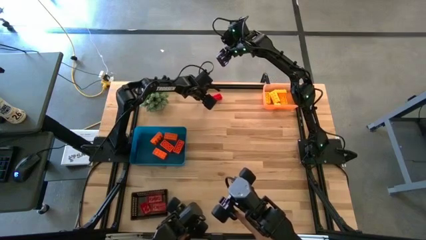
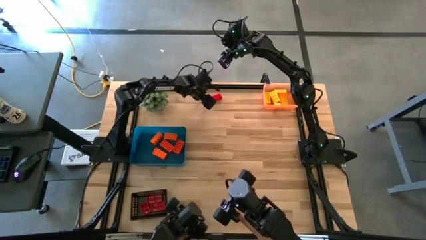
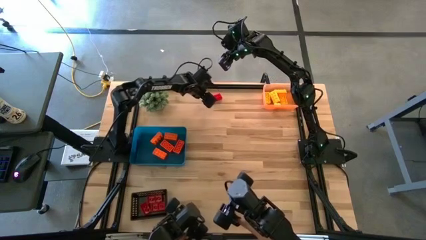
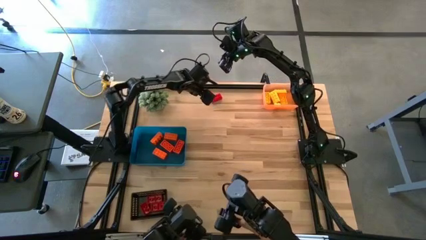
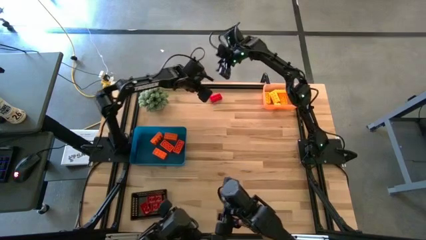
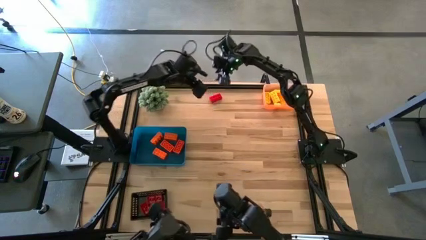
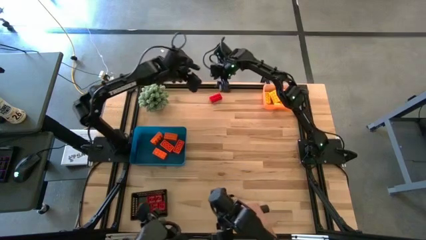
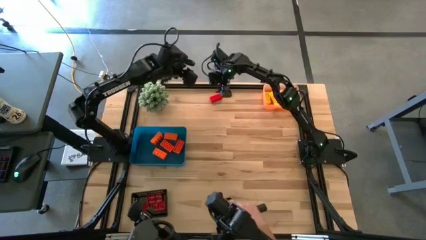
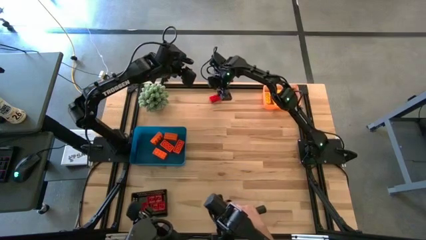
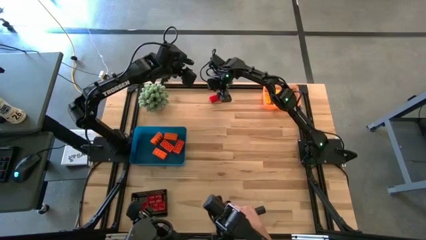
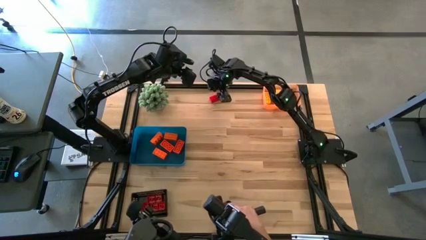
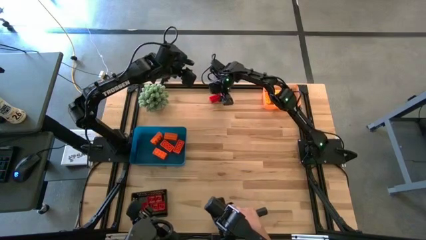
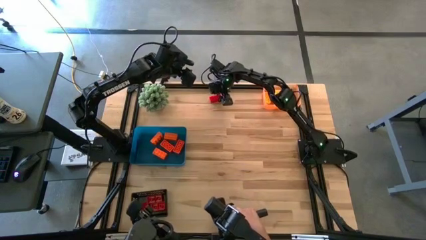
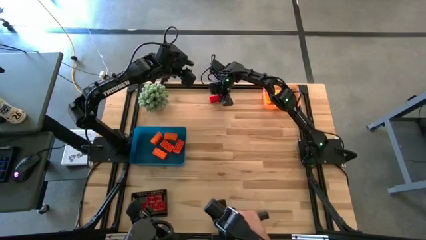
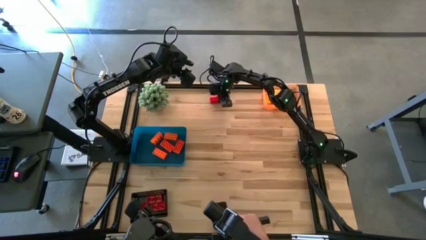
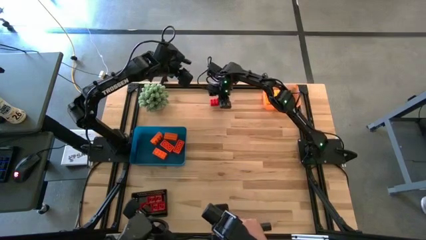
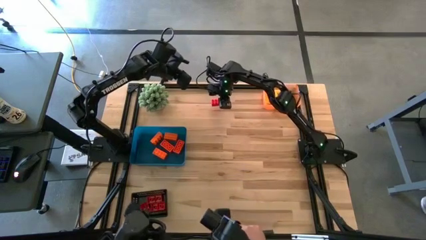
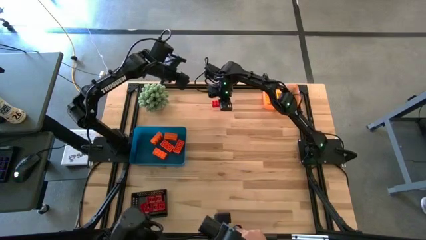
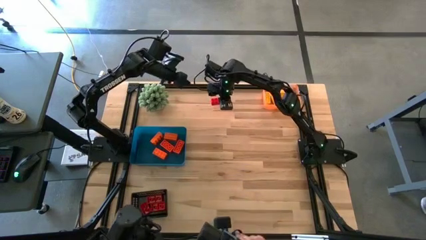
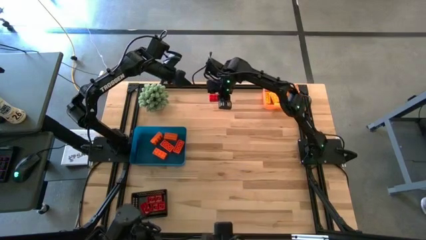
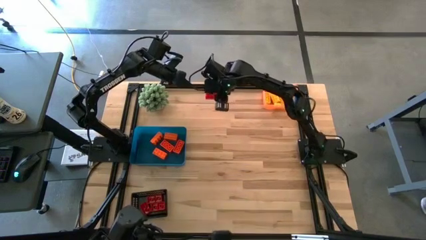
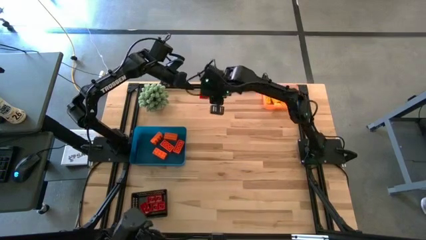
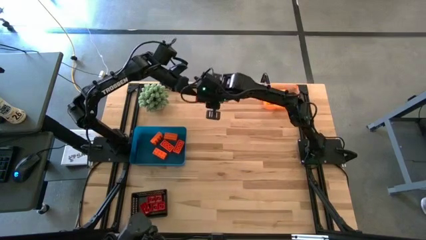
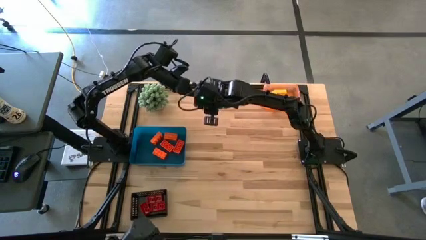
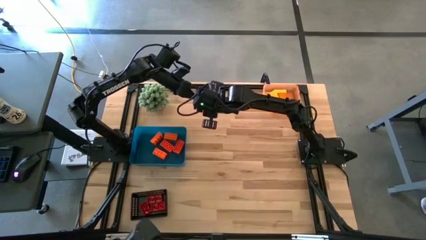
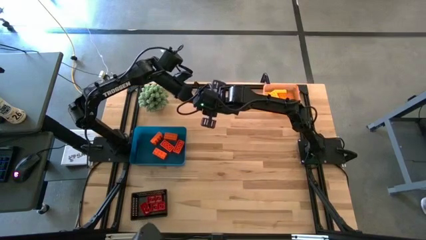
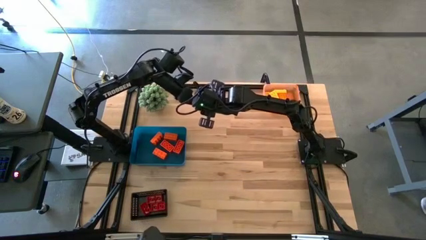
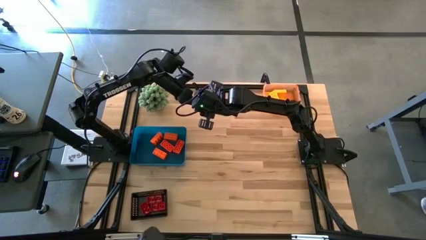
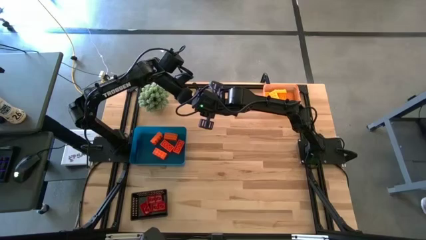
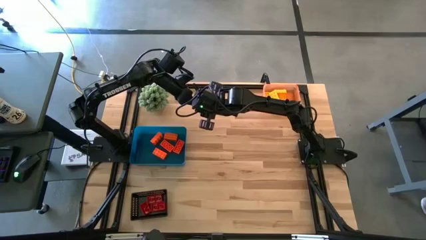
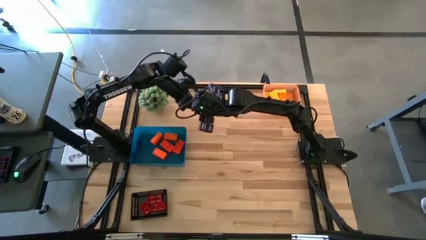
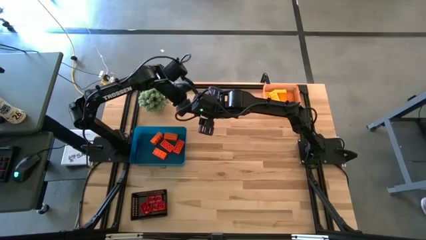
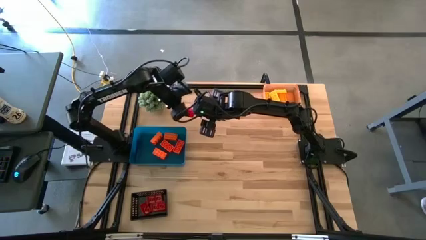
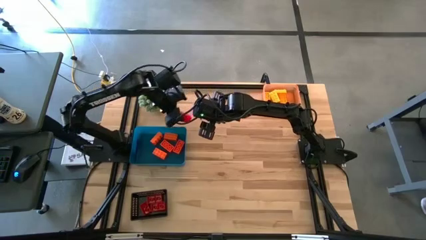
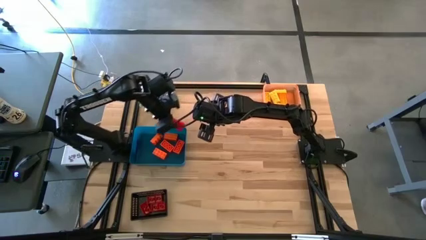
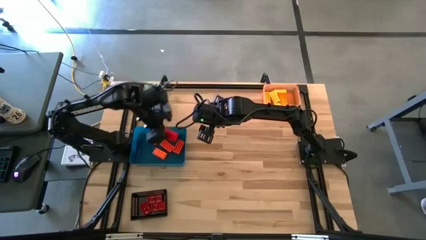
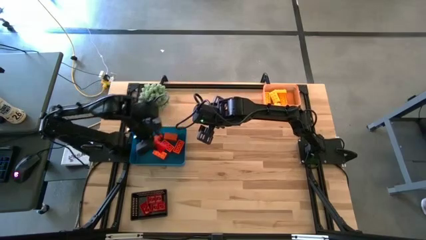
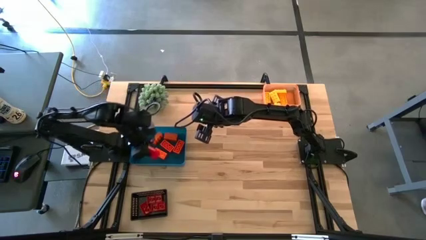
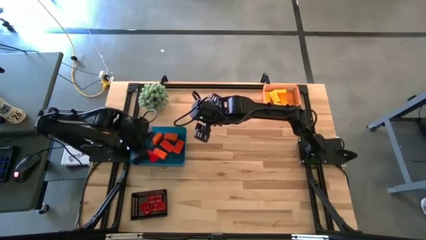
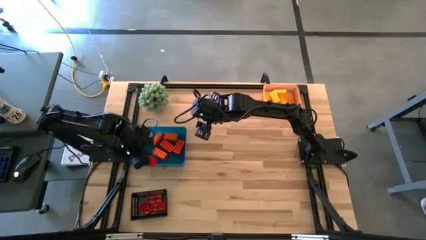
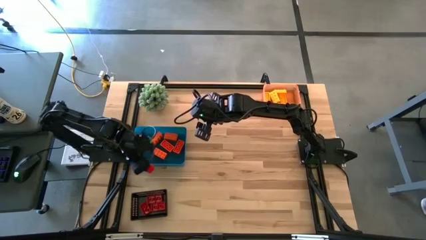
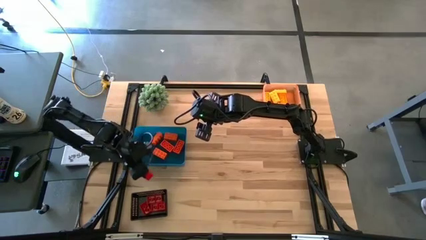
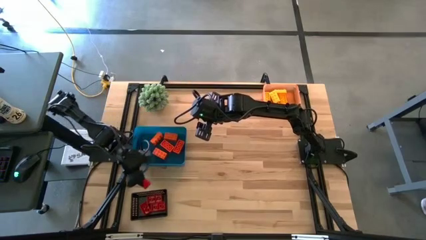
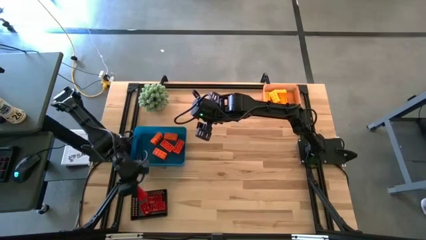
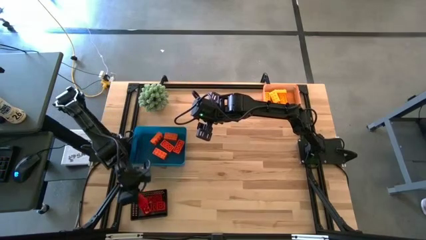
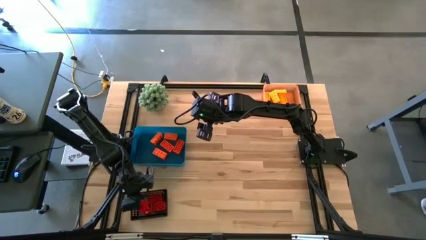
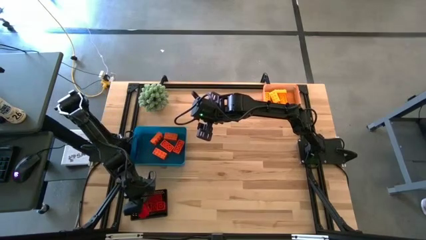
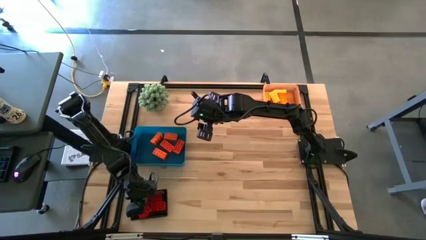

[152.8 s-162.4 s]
Task: Sort & place blocks by color
Put the red game piece into the black bin

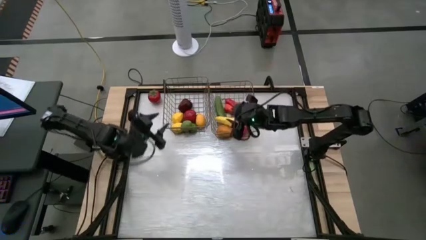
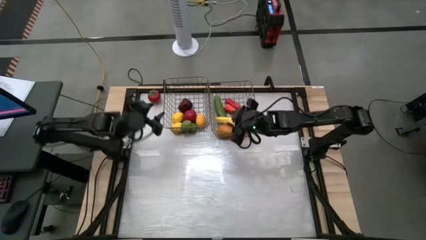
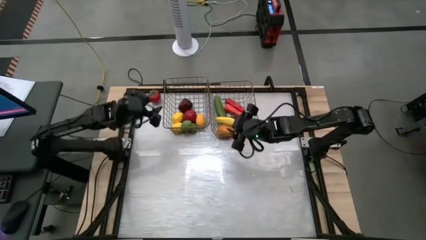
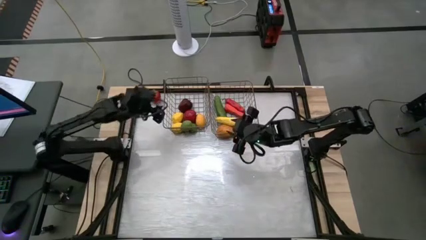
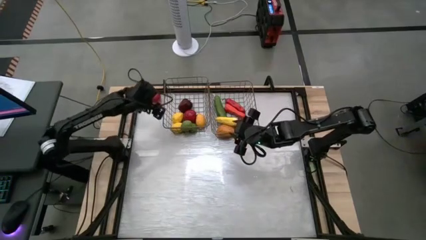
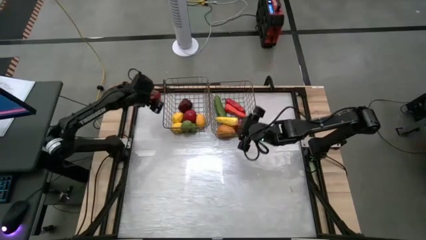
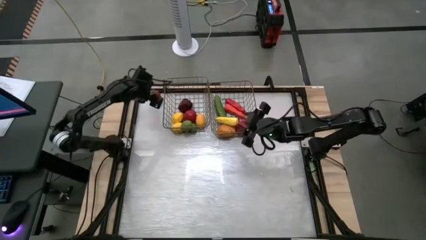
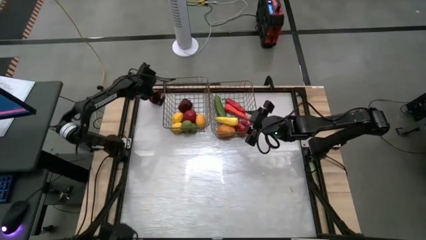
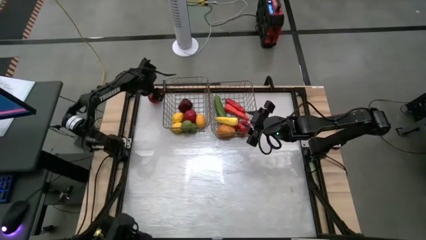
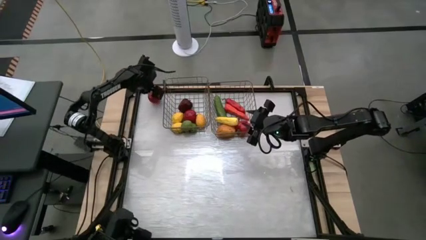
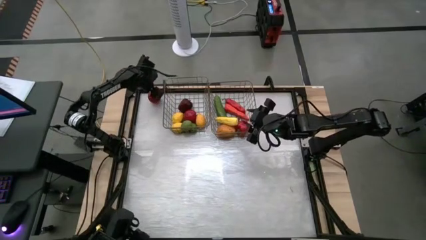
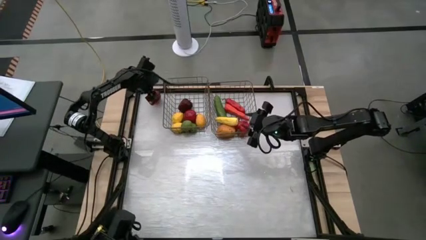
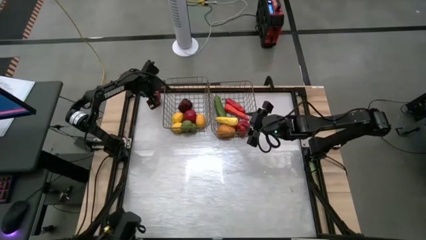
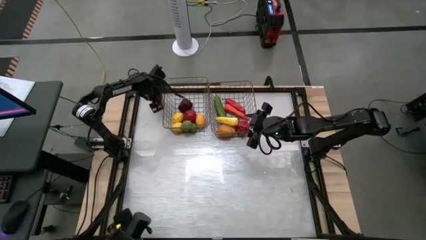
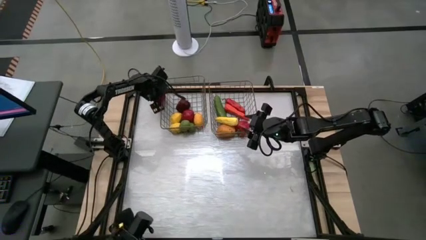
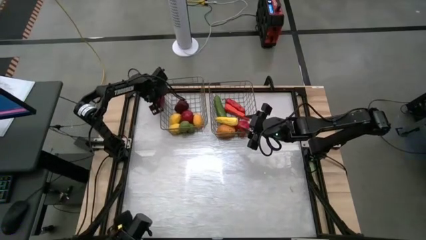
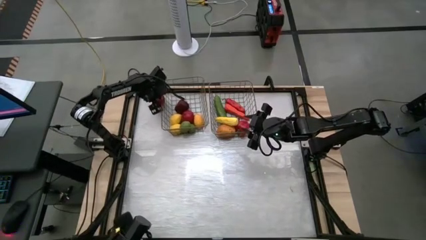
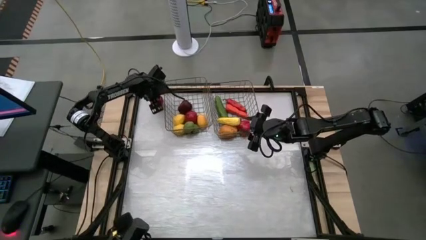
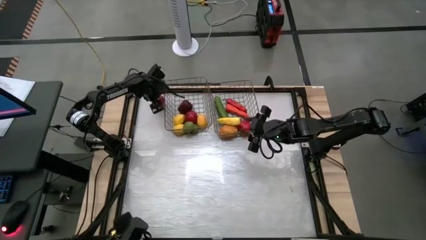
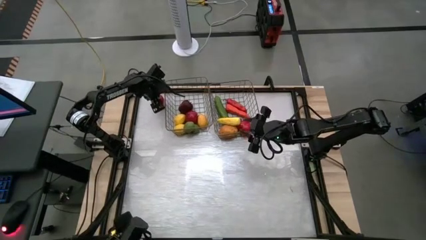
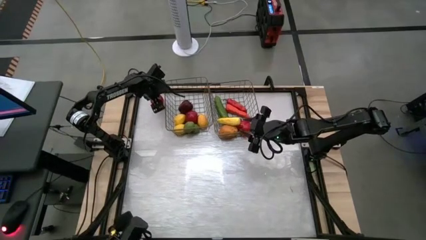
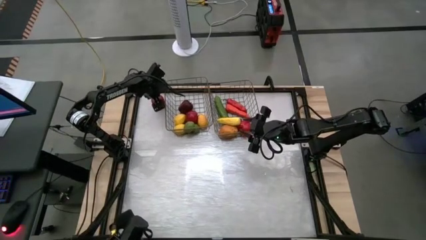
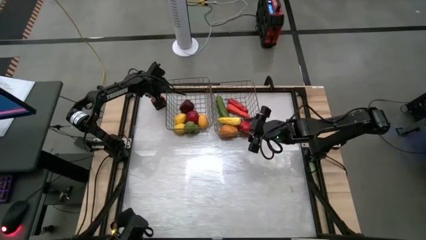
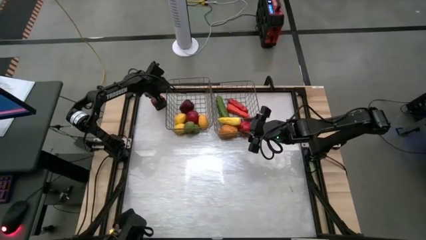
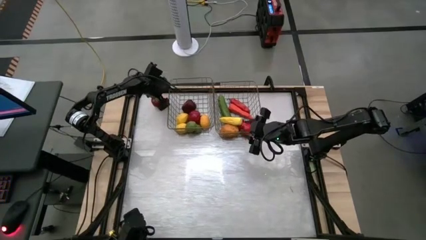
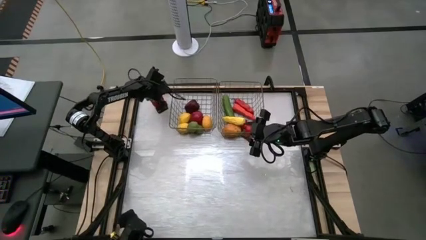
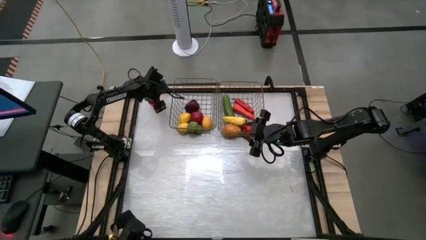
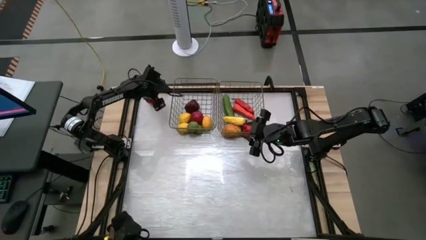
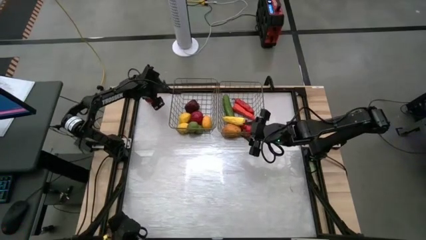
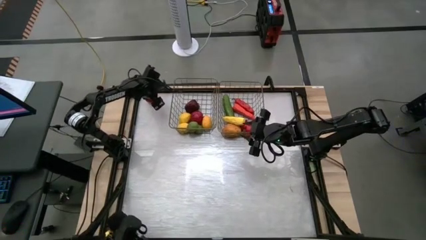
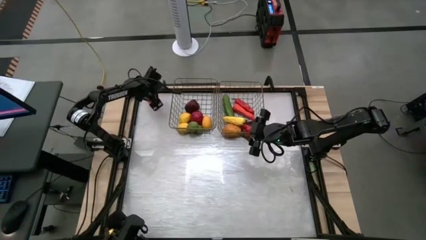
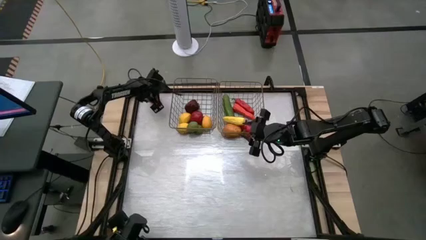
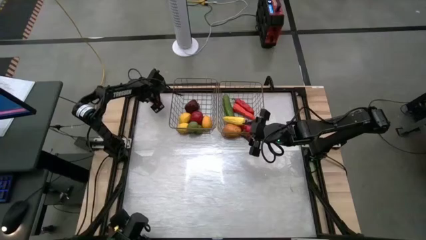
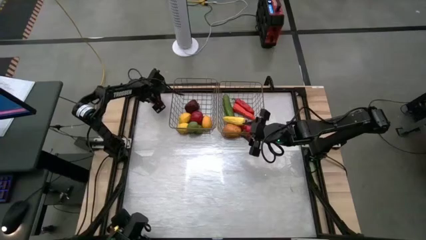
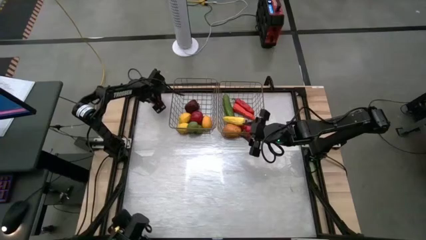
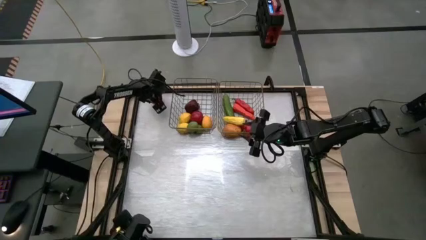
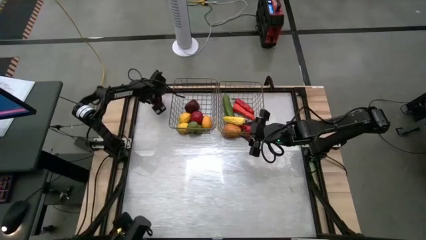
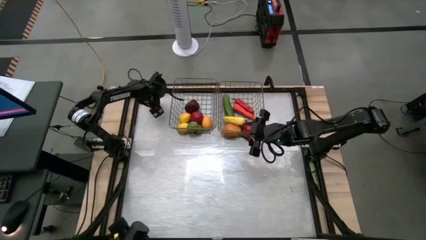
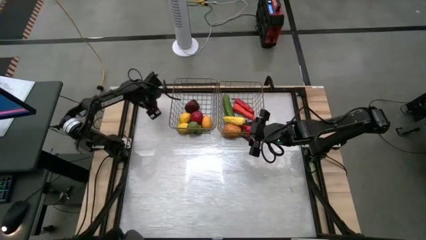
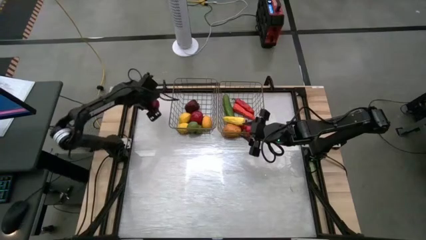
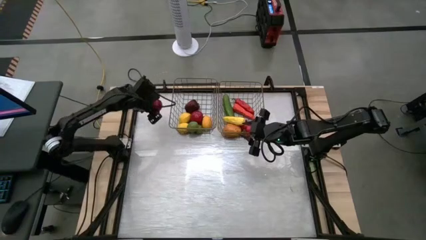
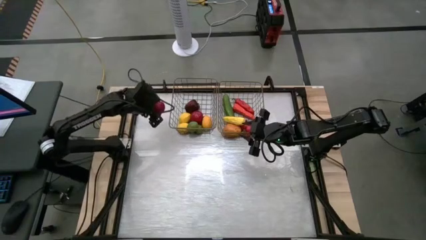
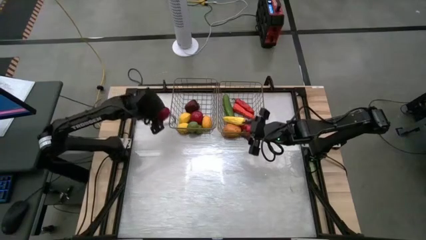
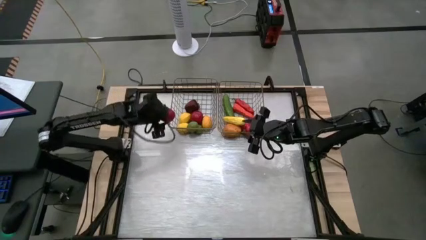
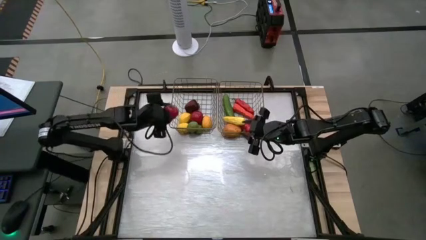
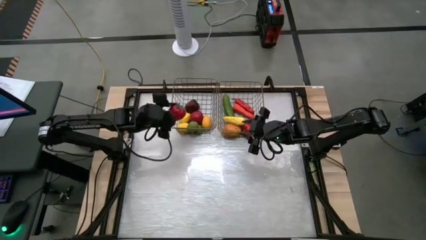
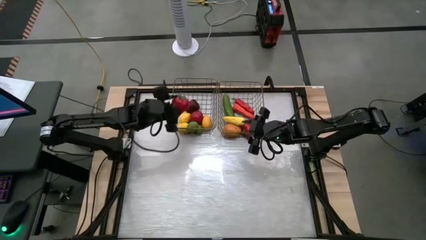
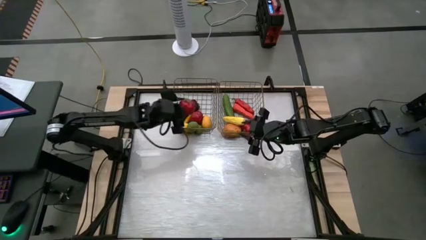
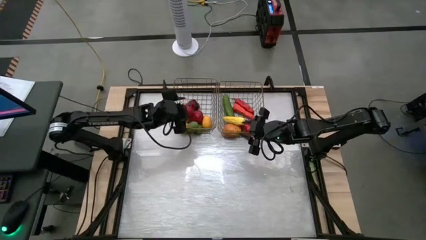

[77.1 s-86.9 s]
Task: Sort produce into baskets
Put the tomato into the left wire basket
